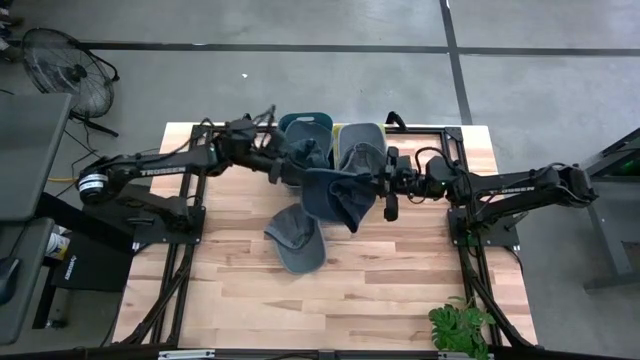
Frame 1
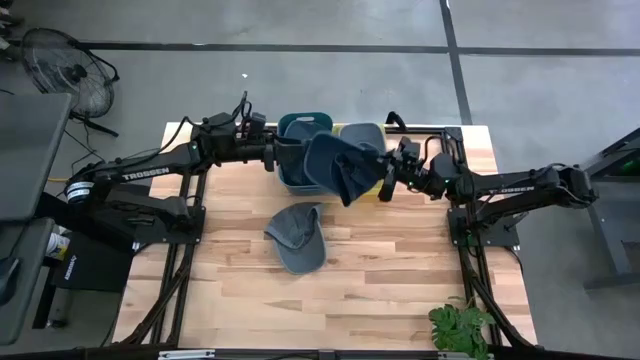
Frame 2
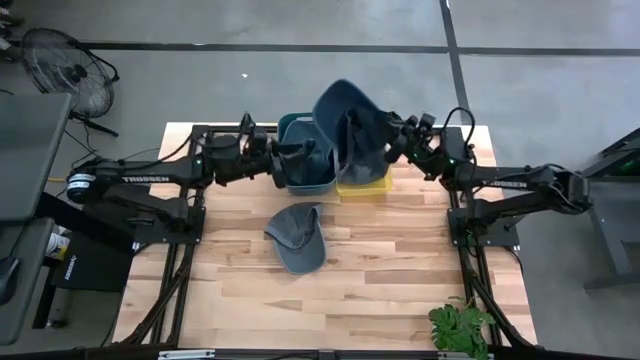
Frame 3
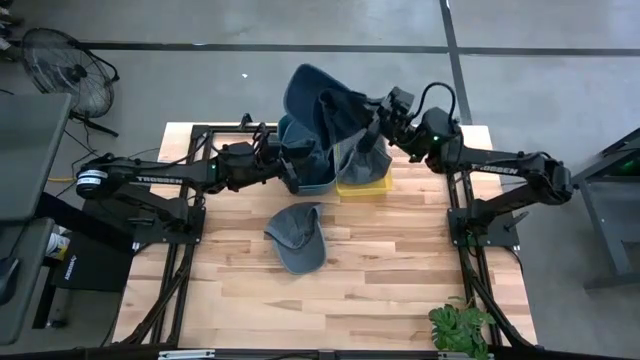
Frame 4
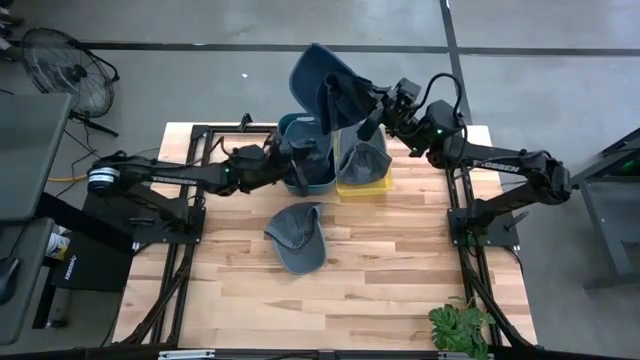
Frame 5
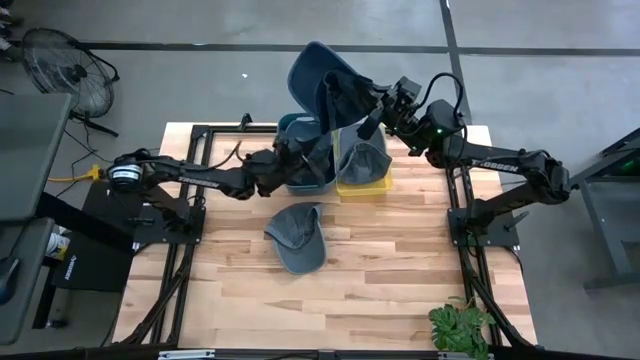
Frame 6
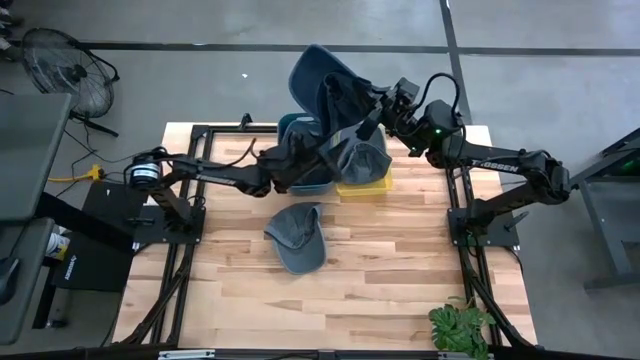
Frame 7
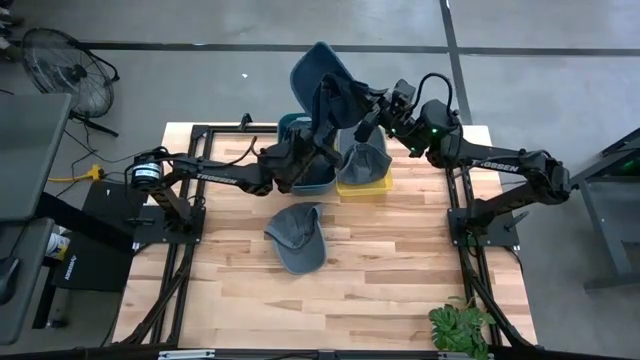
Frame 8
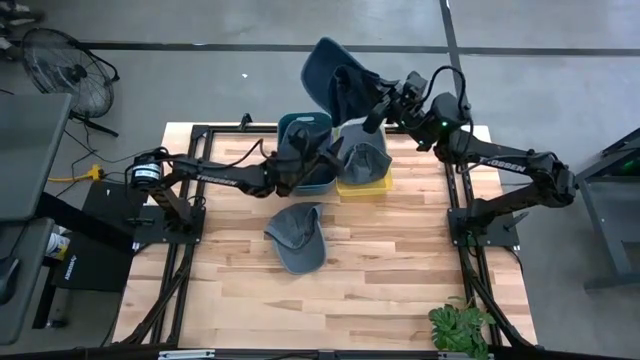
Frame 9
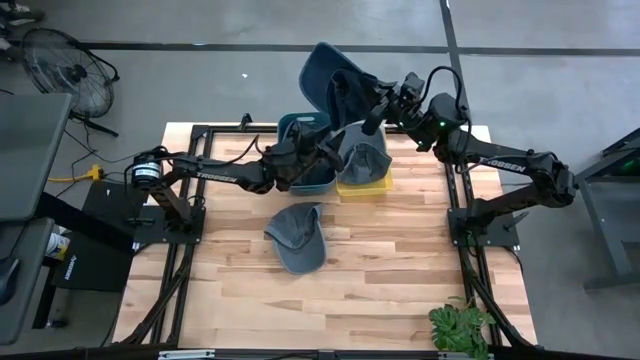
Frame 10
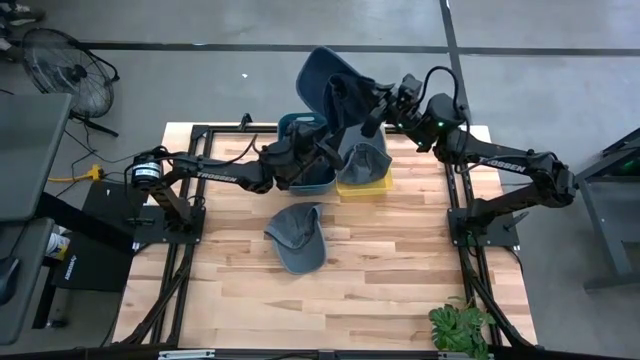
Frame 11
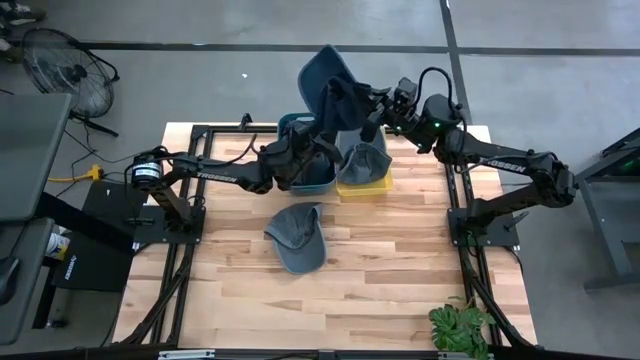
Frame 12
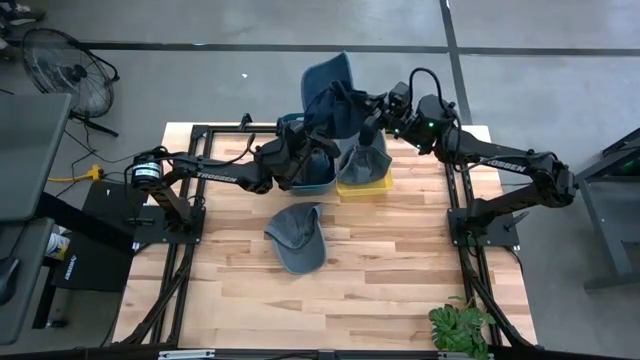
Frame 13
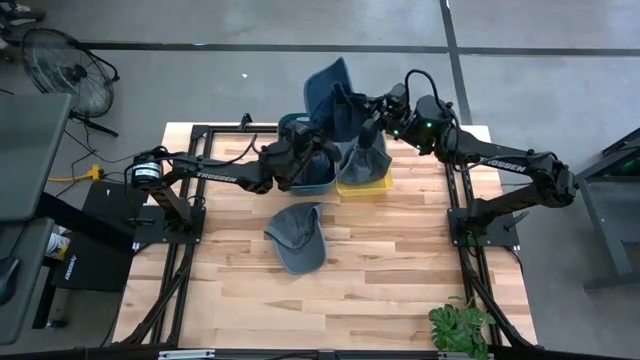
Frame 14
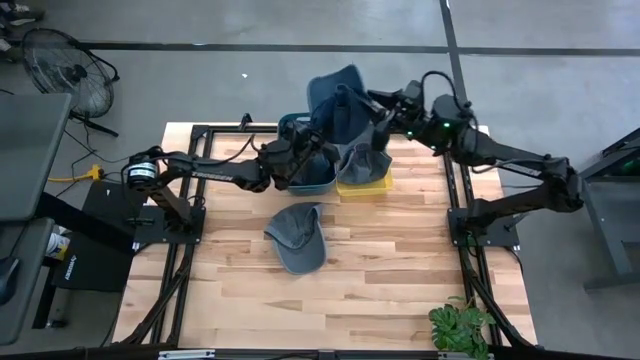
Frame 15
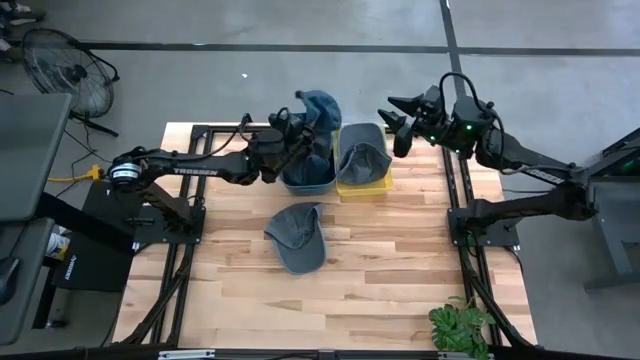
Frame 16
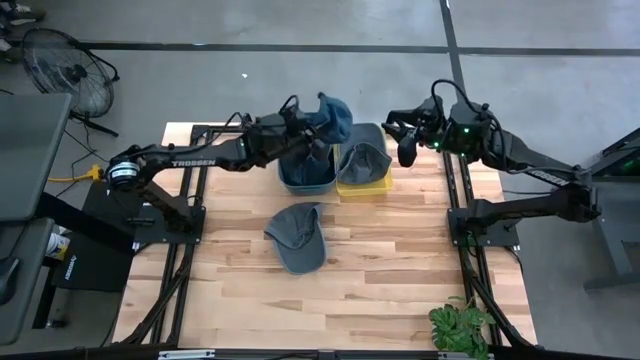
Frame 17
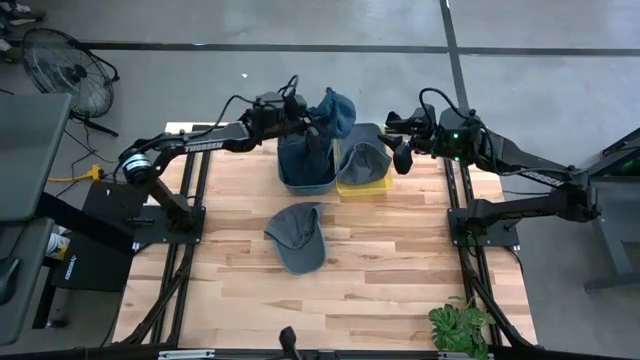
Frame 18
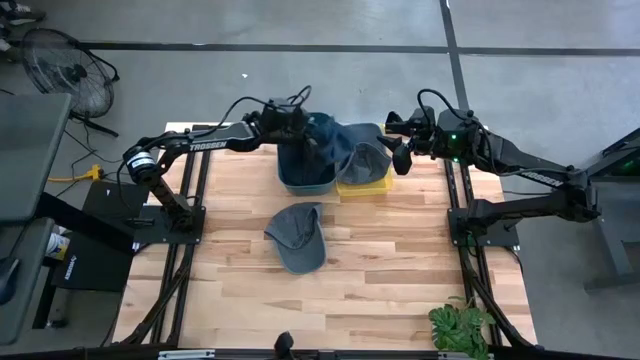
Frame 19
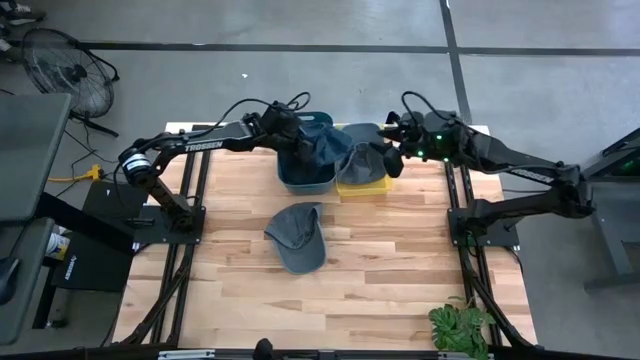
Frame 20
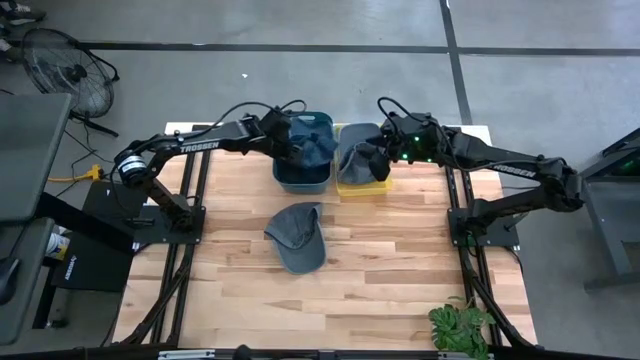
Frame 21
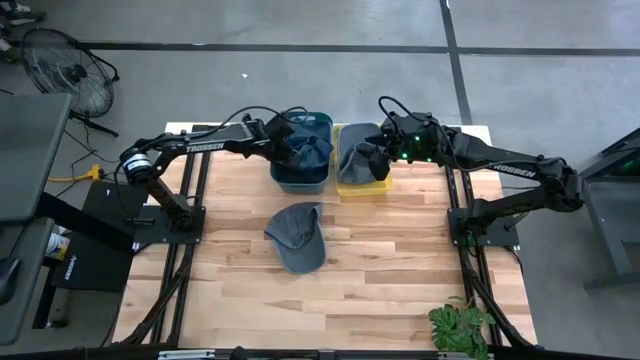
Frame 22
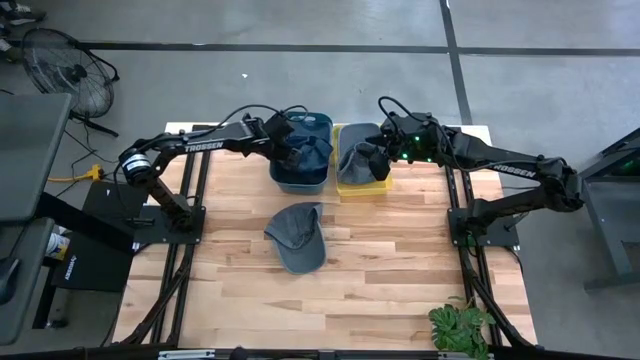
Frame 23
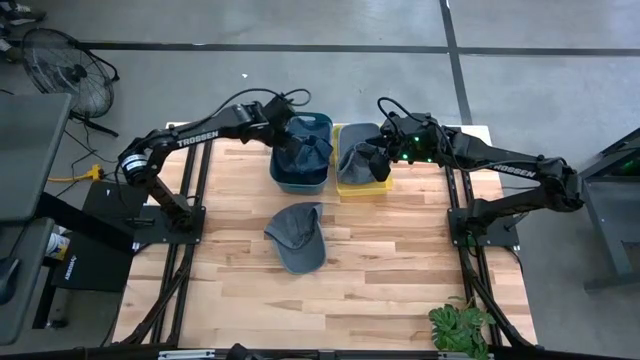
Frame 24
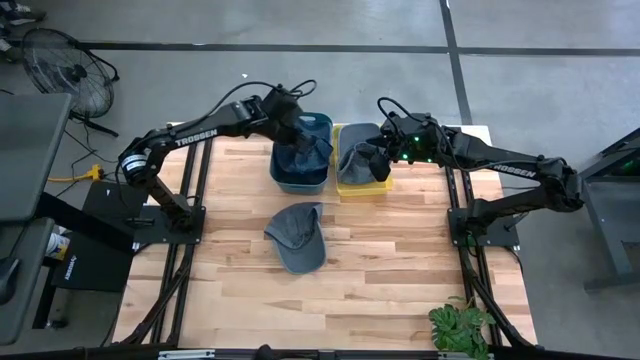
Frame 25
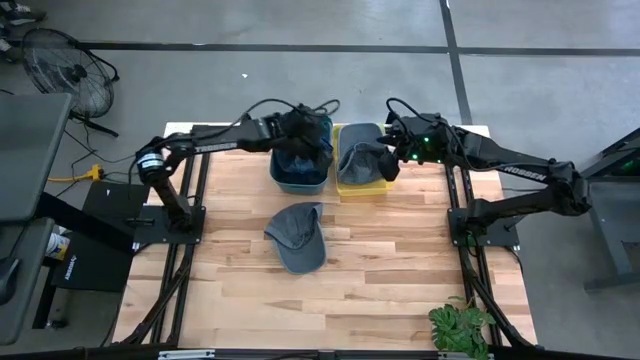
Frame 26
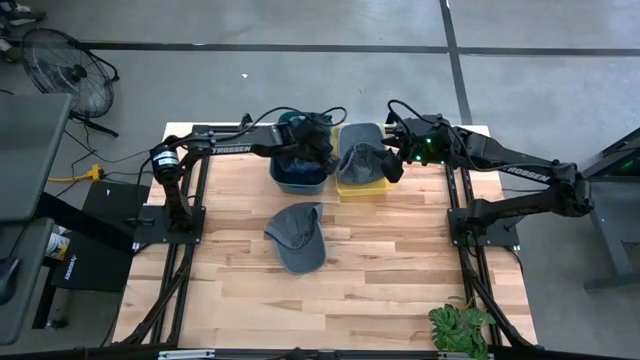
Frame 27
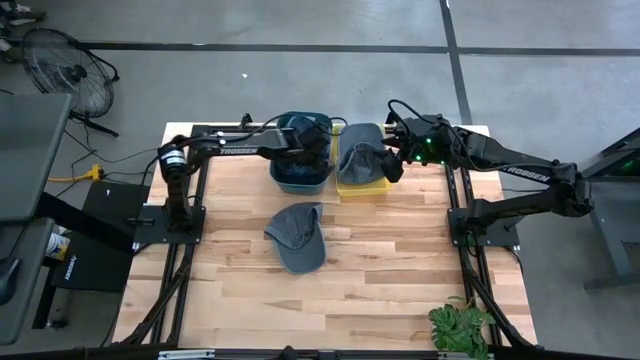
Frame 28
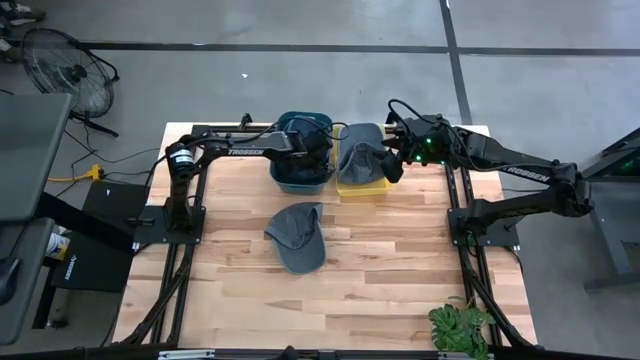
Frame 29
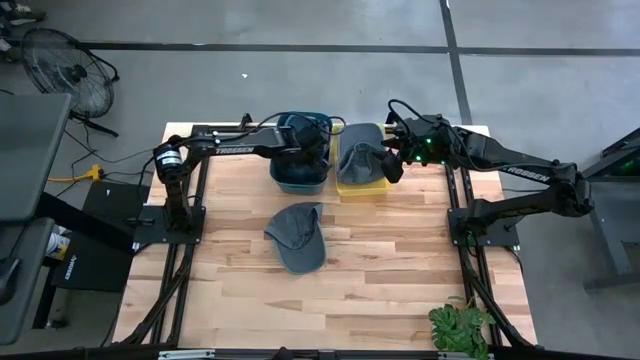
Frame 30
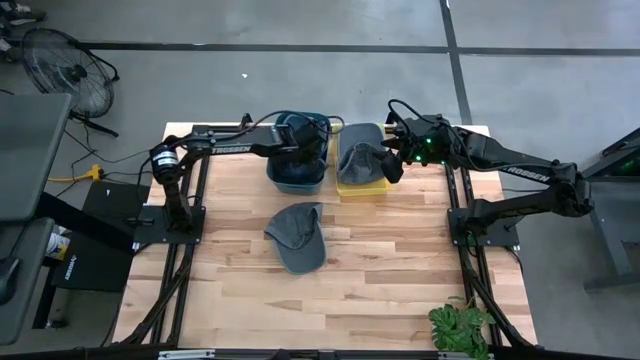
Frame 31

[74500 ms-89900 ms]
Task: Pick & Place hat
Put the blue cap into the blue bin

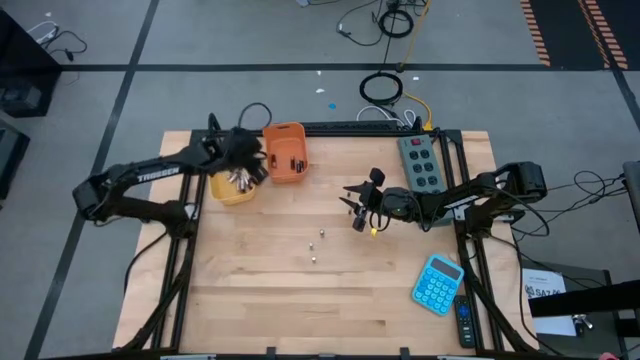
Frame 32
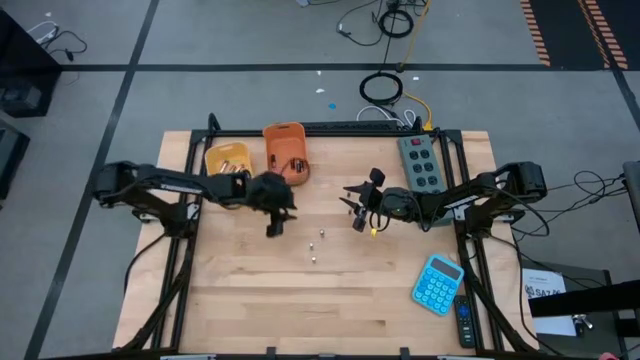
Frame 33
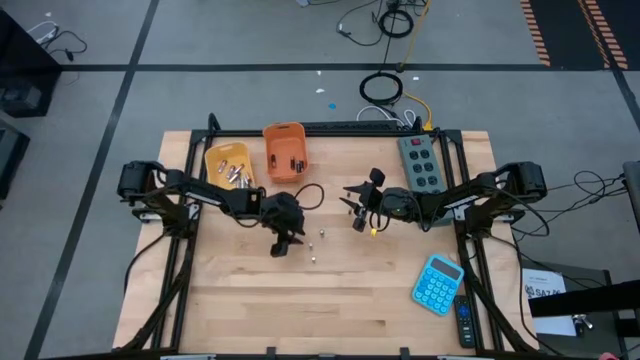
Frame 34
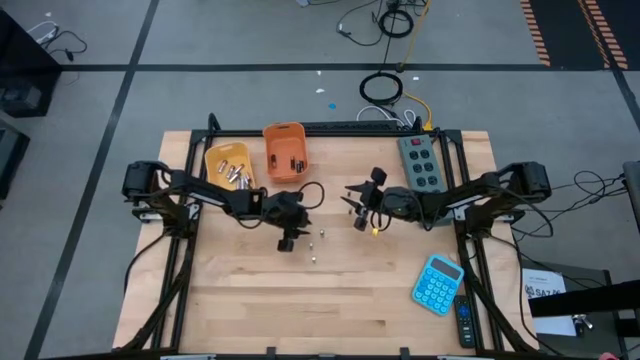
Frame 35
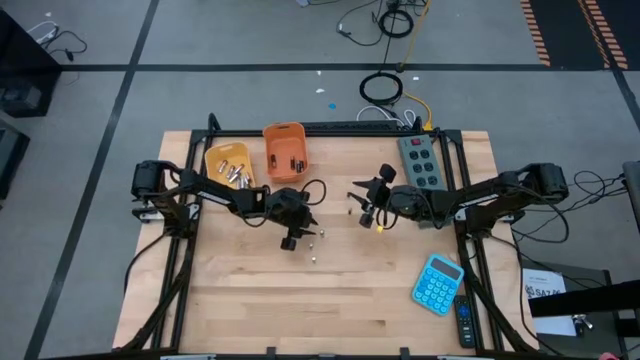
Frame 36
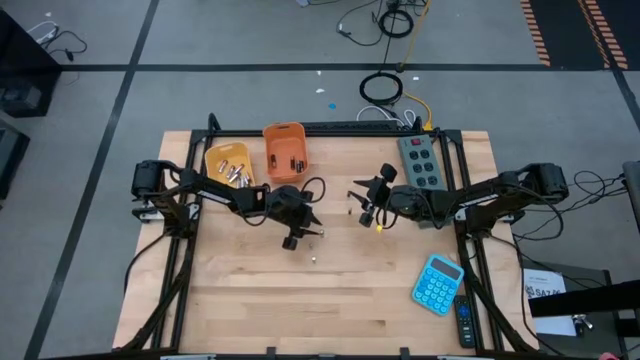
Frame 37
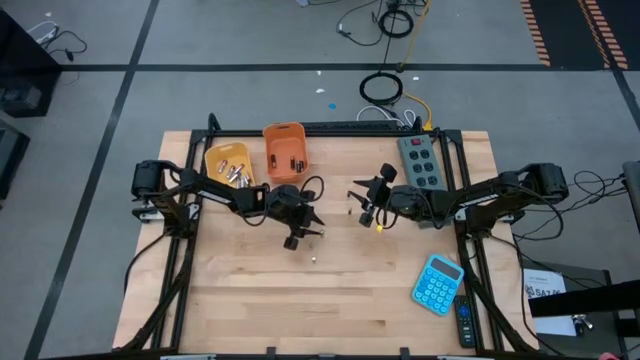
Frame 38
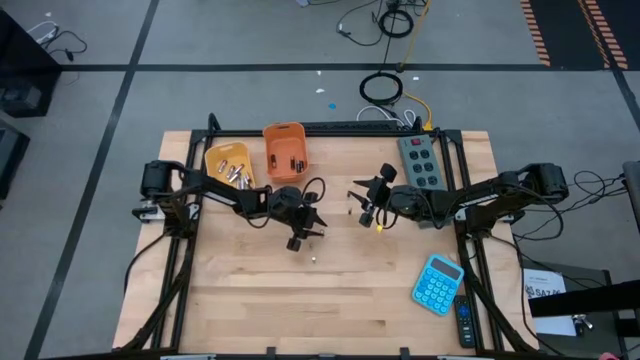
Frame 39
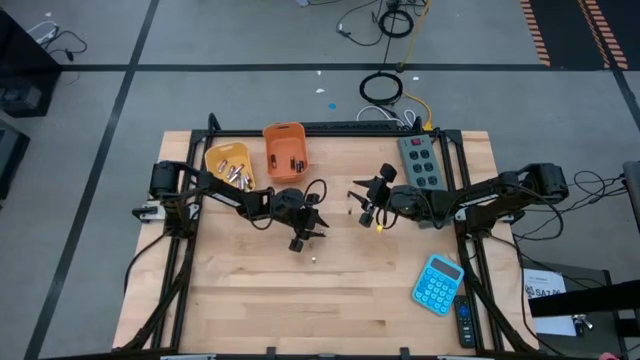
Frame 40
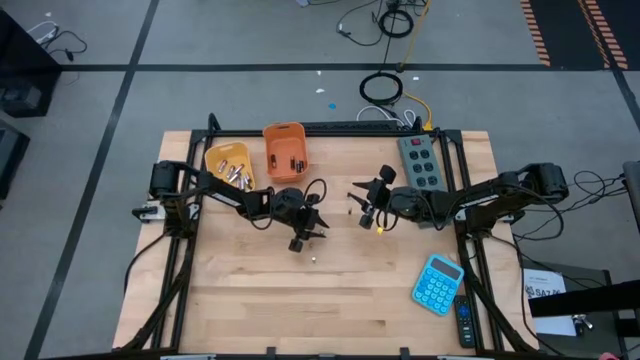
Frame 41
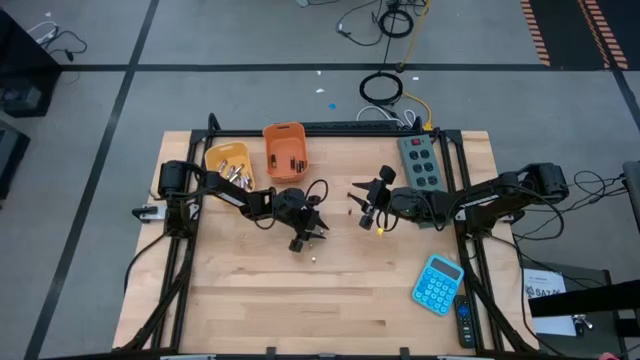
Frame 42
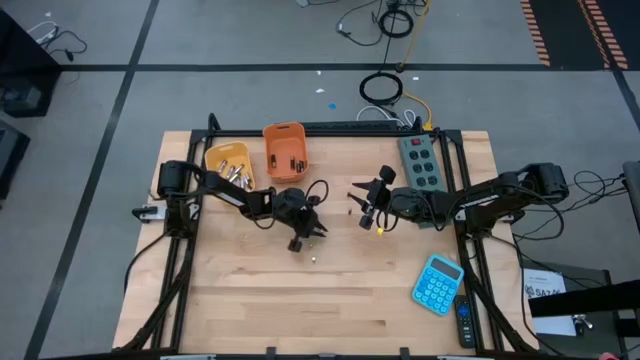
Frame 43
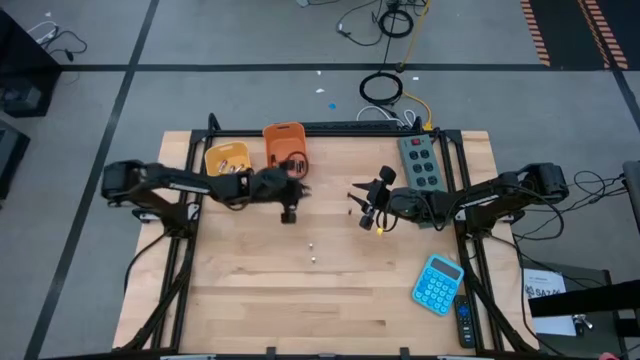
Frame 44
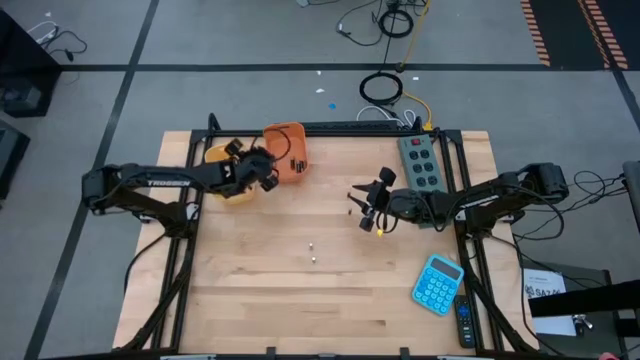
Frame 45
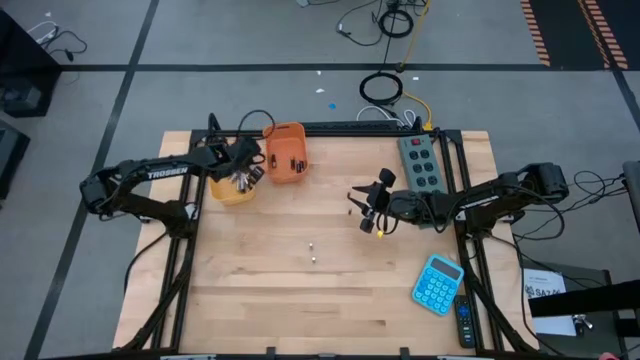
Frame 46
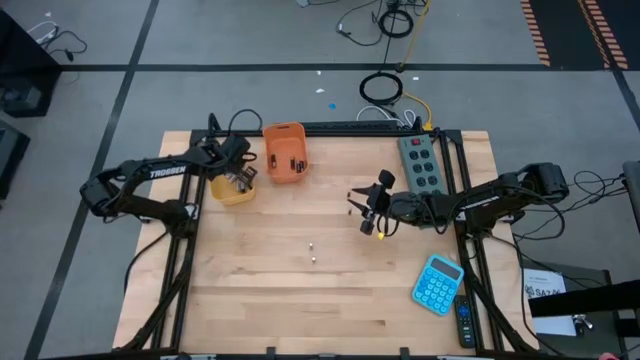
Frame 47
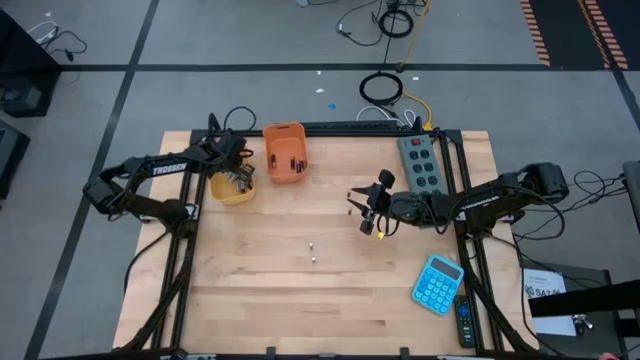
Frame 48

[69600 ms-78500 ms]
Task: Sort batteries
Put the silver battery into the yellow bin
